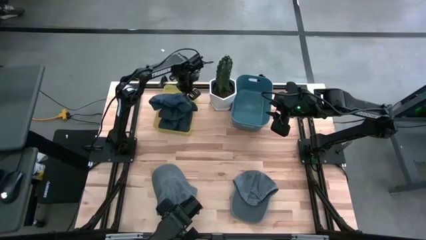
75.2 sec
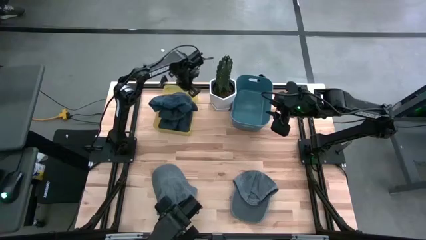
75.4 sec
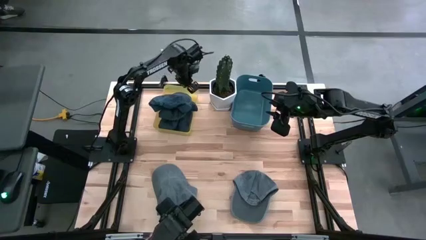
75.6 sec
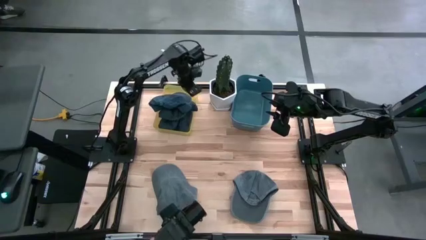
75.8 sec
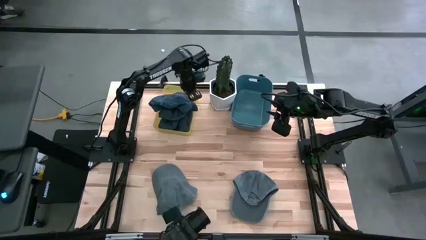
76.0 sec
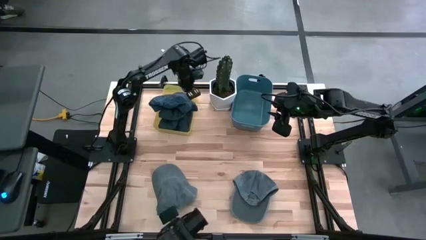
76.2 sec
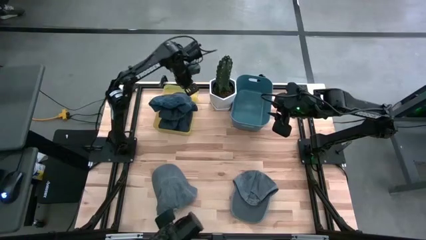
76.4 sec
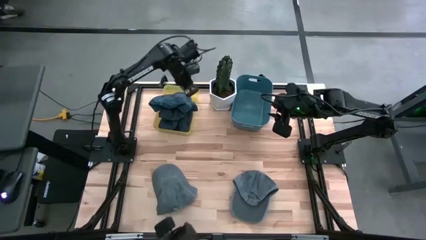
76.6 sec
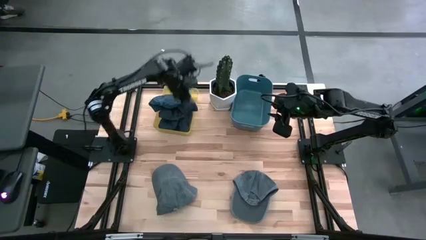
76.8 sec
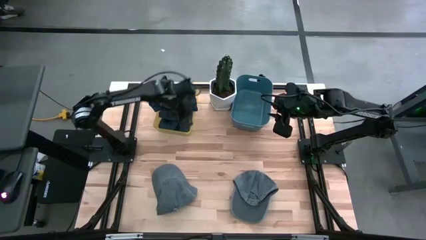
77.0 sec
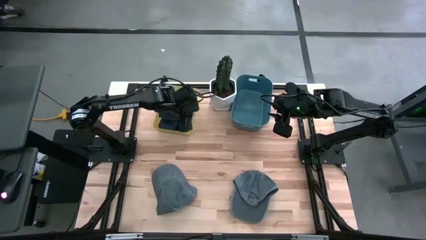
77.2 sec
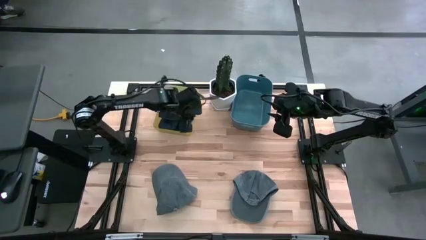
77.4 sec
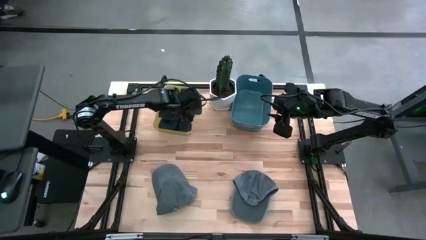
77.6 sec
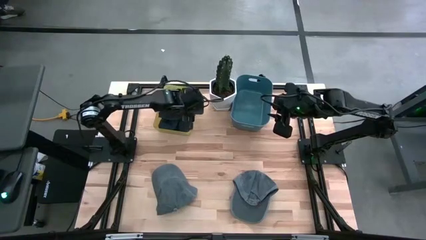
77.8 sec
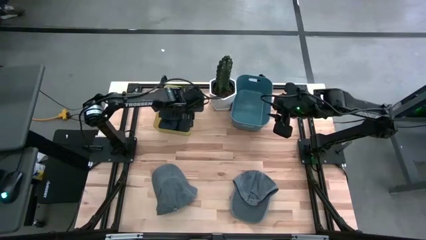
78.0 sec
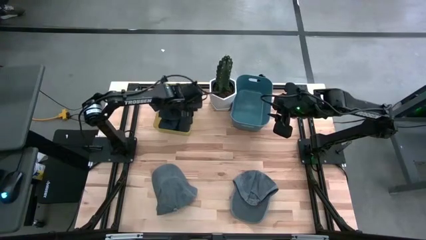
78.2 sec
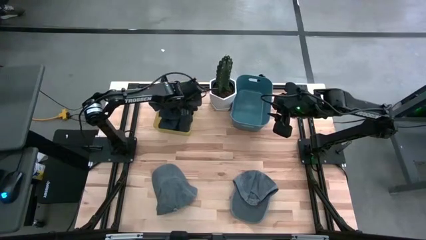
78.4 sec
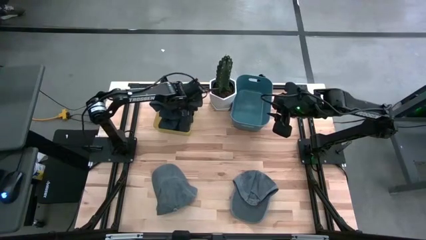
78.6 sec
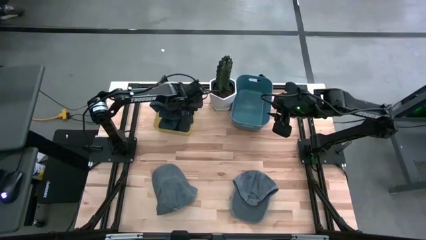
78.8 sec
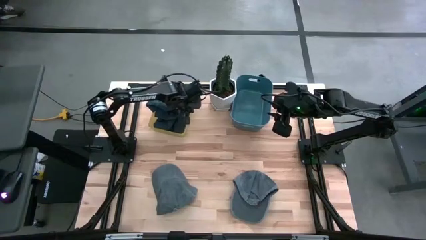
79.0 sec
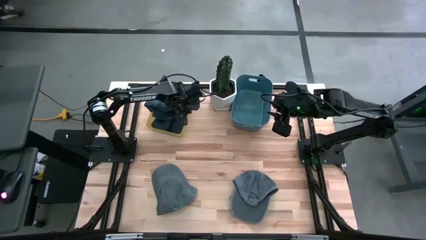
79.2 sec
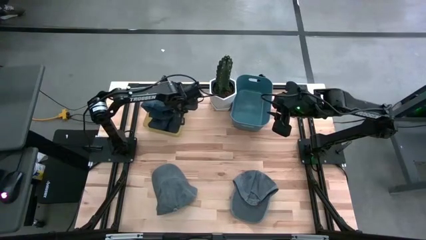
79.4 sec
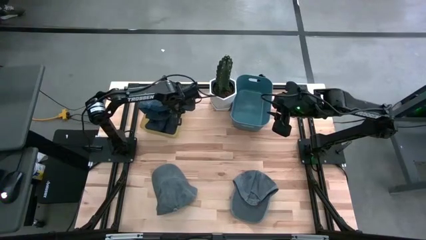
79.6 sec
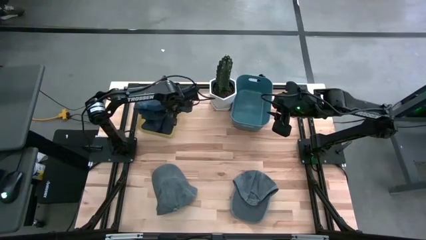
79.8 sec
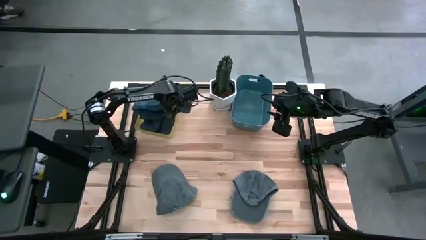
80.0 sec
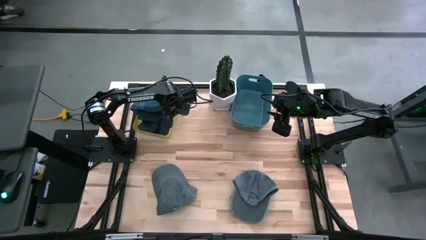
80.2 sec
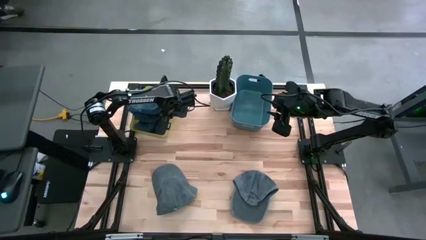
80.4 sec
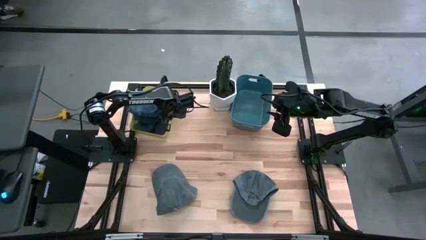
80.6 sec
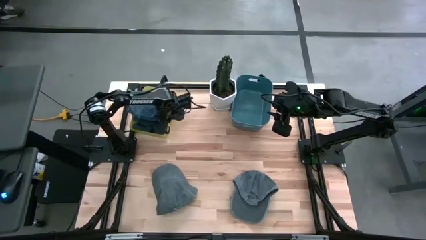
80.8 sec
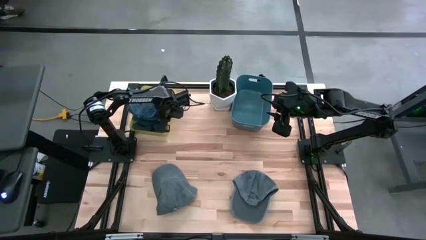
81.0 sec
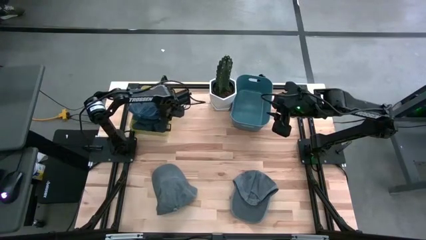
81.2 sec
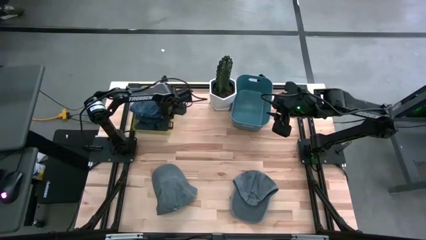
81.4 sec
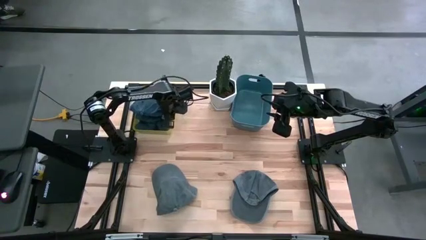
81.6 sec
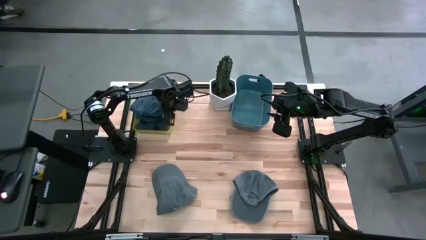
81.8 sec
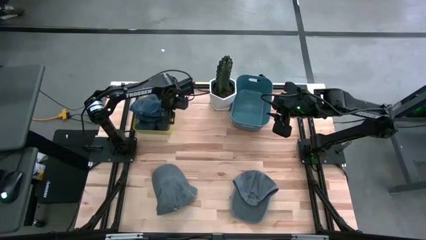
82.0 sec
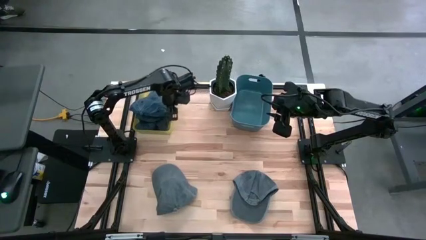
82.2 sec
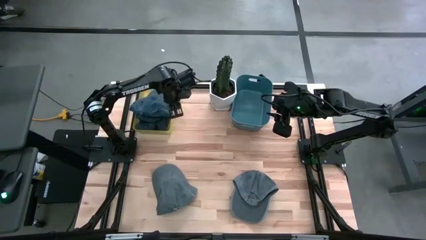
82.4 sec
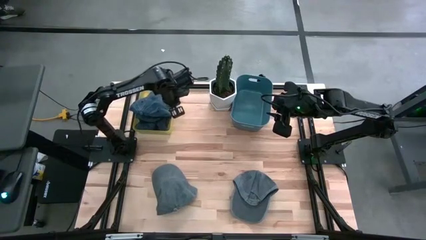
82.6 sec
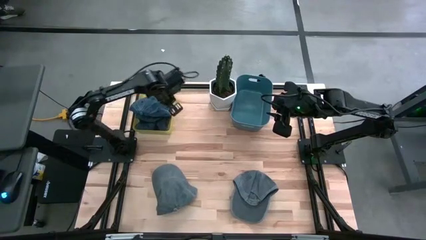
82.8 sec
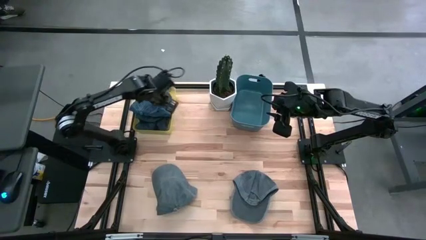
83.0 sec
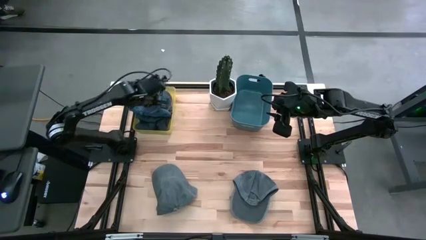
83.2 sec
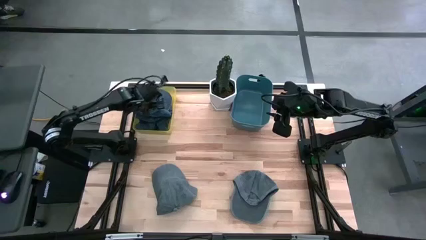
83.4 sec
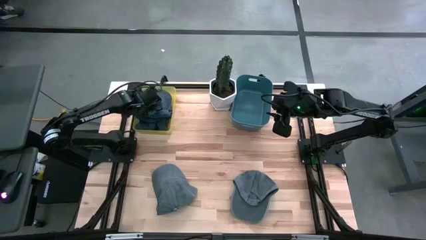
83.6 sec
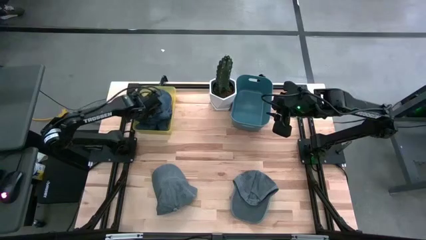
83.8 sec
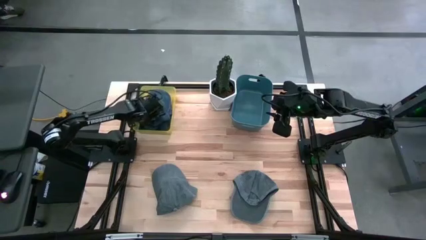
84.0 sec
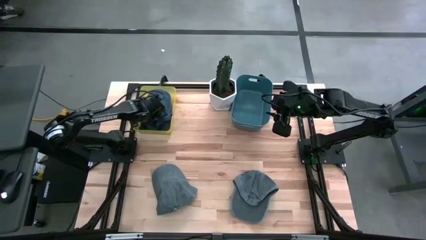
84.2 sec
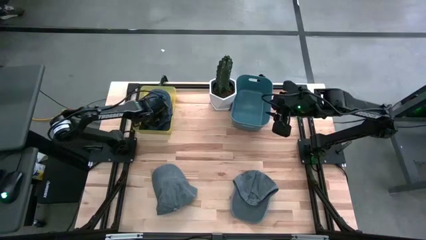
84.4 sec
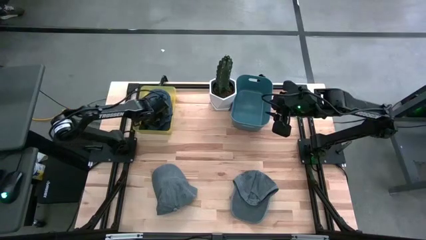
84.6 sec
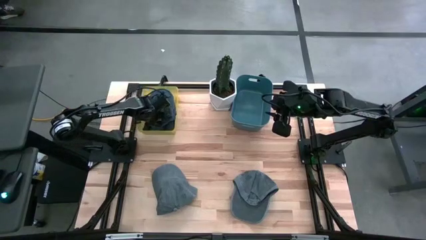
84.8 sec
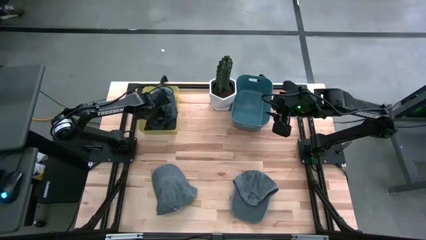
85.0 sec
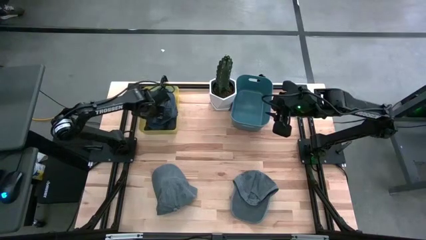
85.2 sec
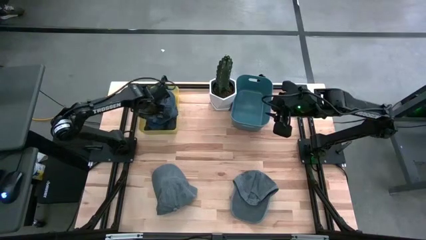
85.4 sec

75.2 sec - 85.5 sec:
Task: Pick & Place hat
Adjust the blue caps in the yellow bin

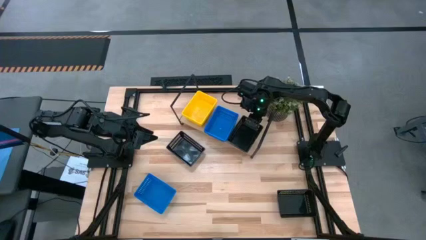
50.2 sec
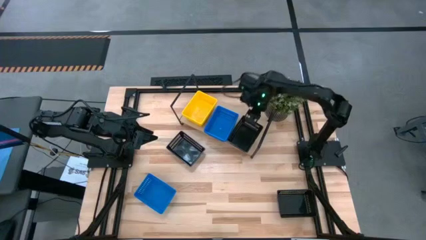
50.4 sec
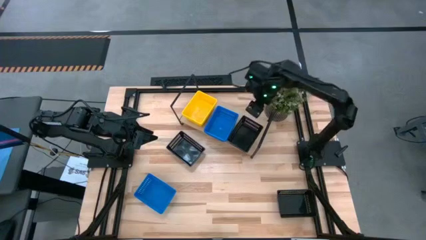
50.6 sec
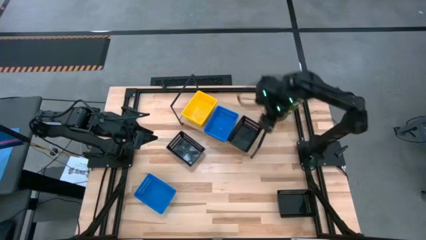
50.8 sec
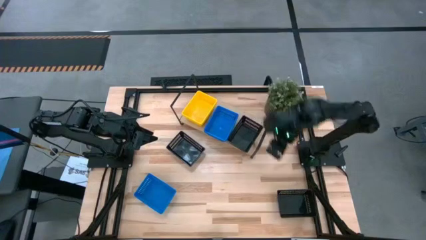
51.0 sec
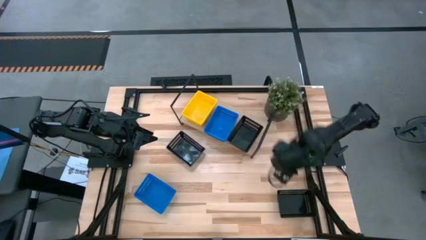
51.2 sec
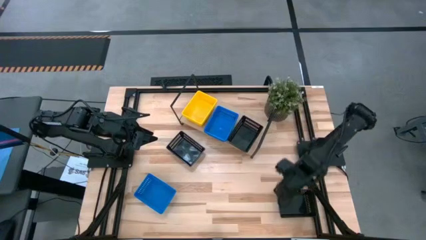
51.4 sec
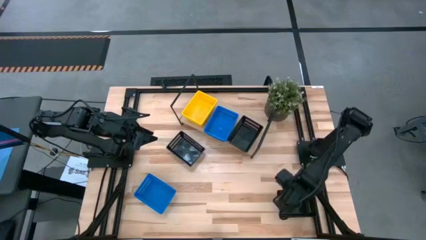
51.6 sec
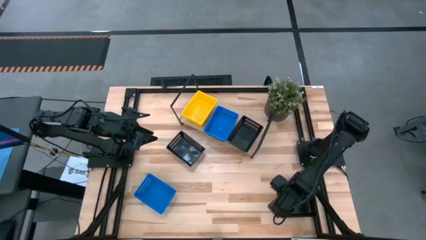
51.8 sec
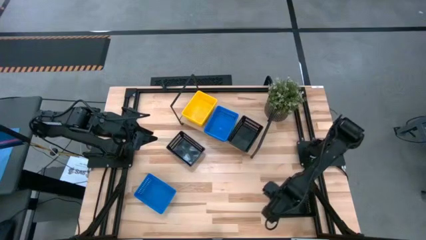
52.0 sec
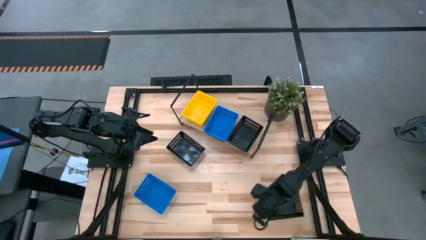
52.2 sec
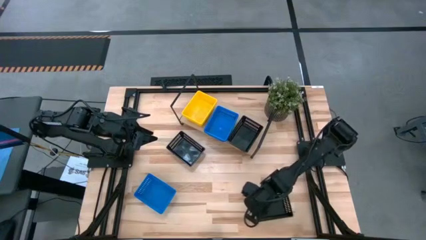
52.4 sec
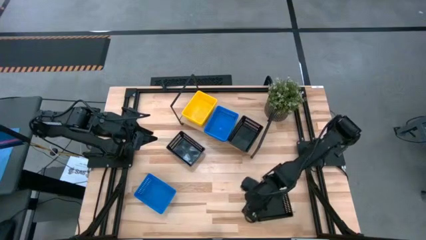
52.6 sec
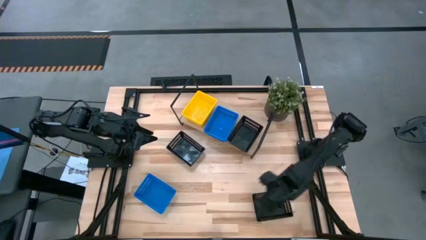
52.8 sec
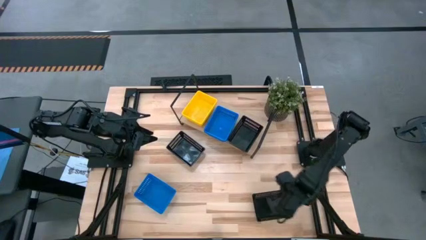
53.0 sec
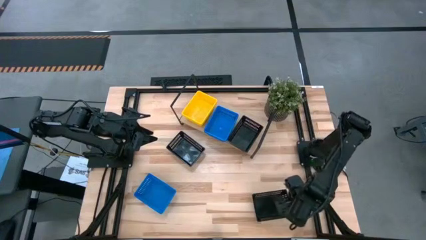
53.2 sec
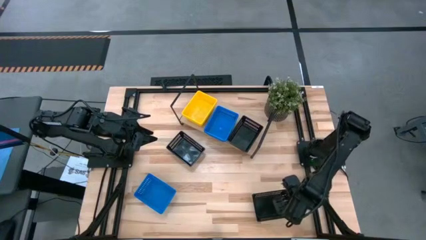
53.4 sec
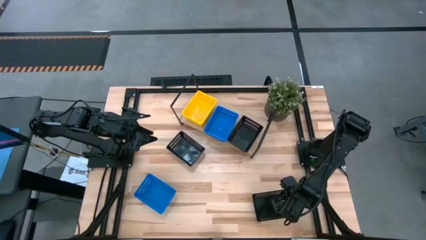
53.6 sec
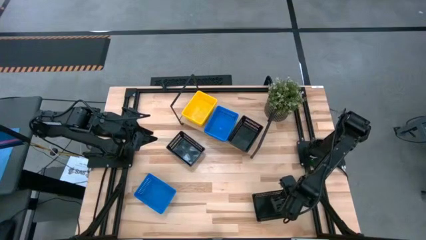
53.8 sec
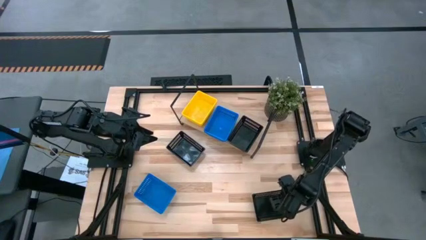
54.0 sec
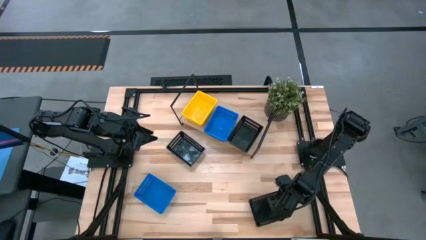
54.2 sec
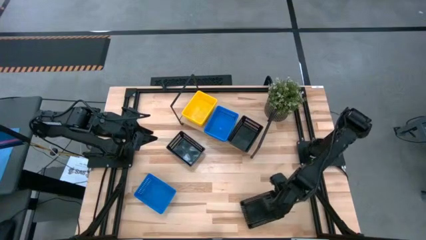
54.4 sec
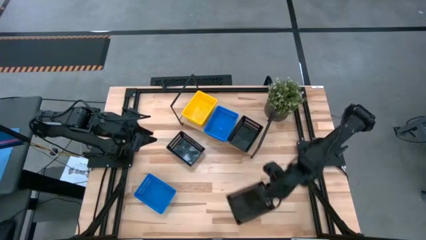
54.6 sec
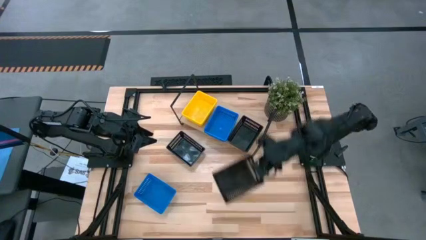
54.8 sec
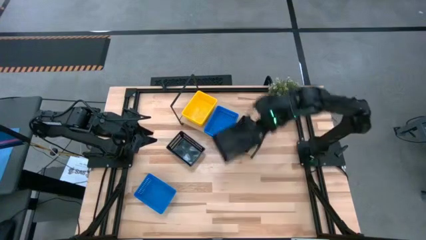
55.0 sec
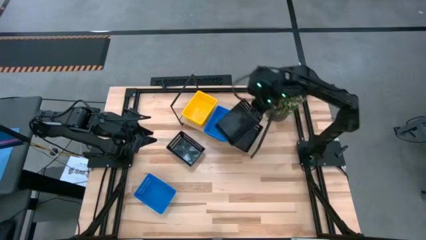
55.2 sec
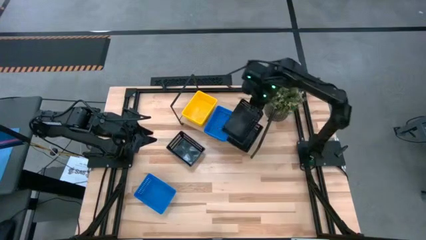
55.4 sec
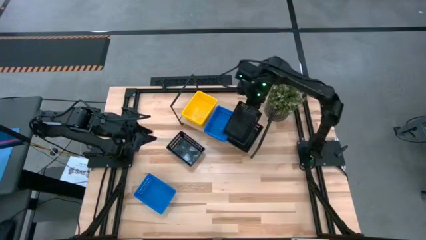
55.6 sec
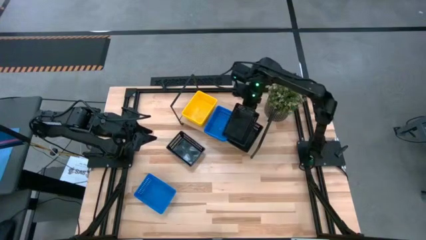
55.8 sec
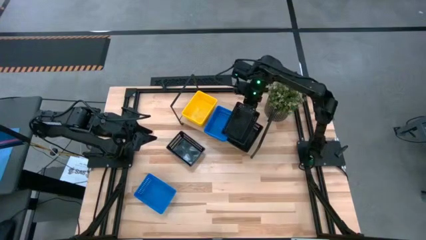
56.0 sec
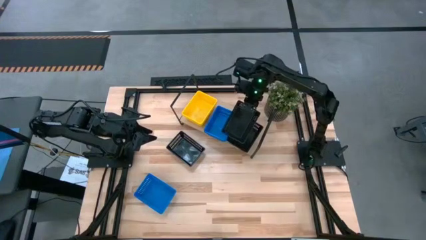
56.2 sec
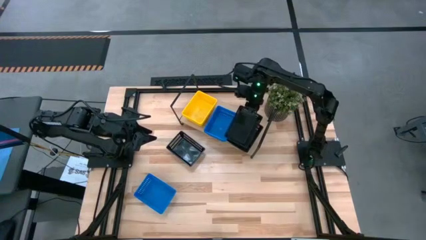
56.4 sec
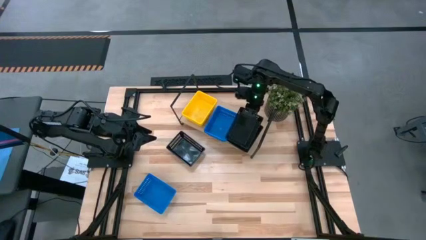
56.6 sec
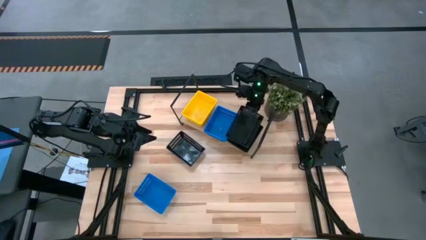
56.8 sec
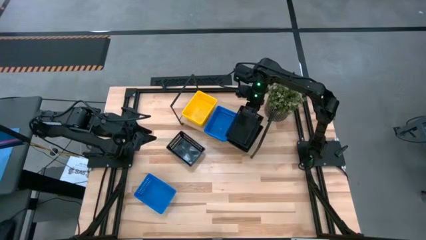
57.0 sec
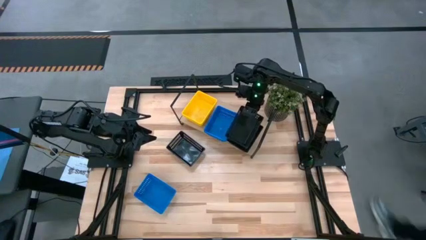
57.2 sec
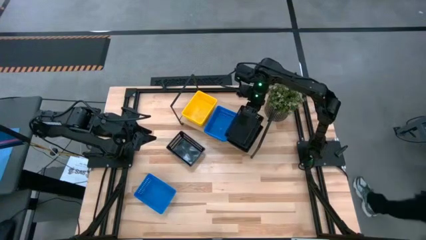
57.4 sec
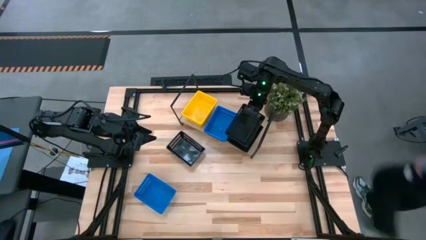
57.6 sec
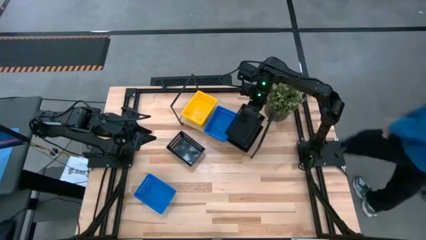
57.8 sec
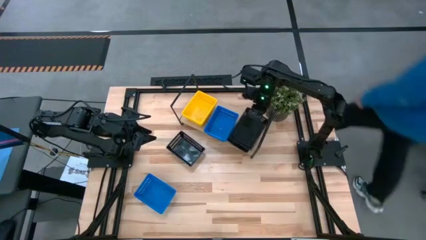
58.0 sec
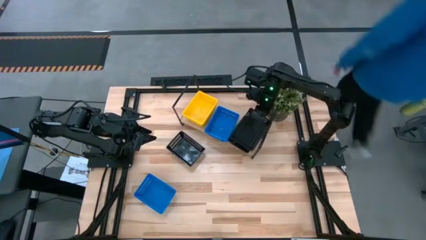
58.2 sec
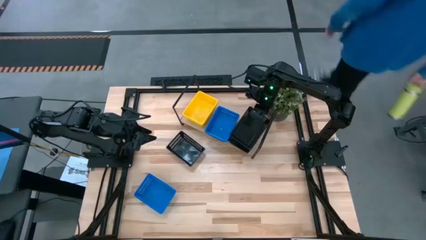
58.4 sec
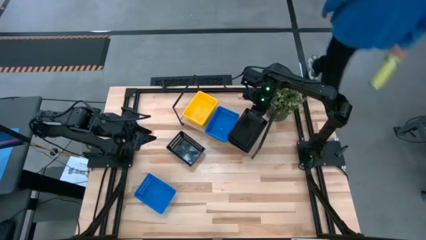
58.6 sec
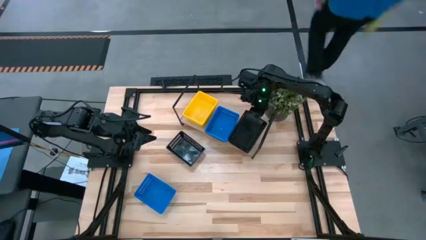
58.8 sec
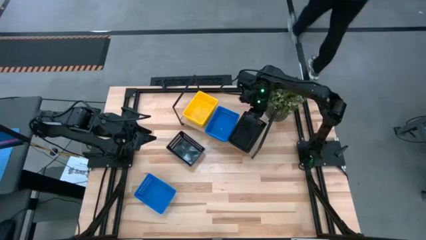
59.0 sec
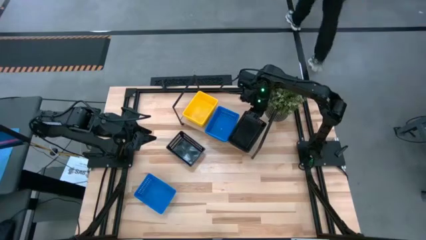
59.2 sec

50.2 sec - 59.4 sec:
Task: Stack baskets on shelf by color
Stack the right black bin on the top of the blue bin on the shelf
